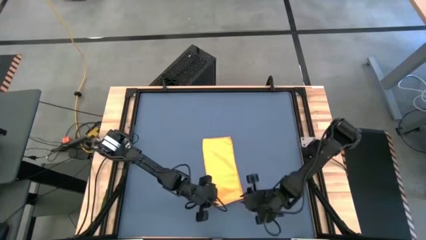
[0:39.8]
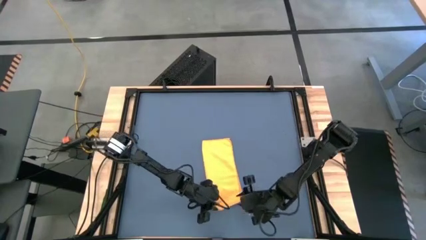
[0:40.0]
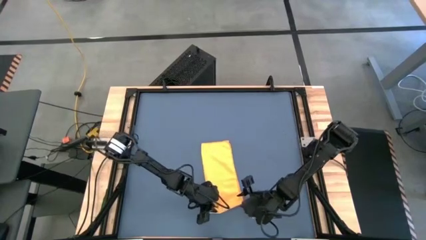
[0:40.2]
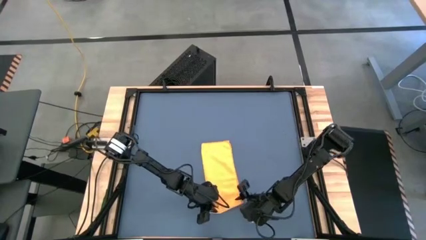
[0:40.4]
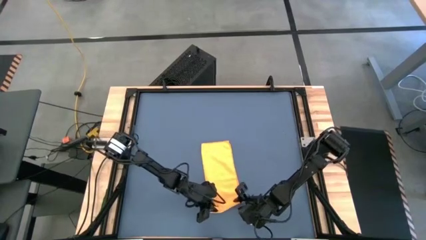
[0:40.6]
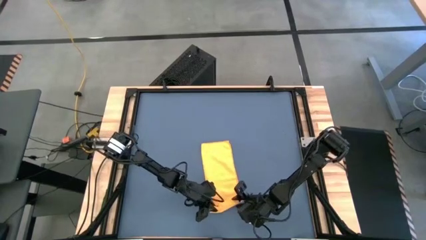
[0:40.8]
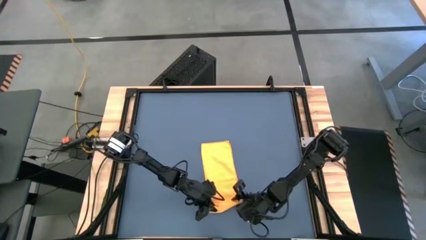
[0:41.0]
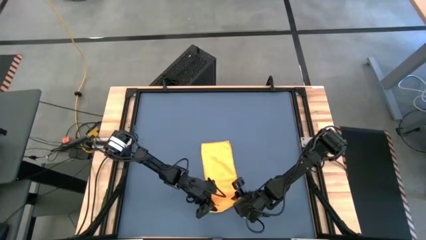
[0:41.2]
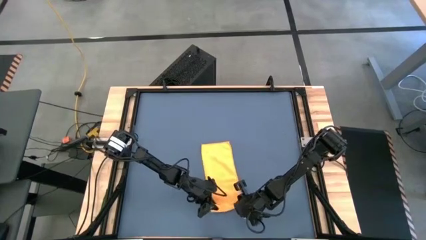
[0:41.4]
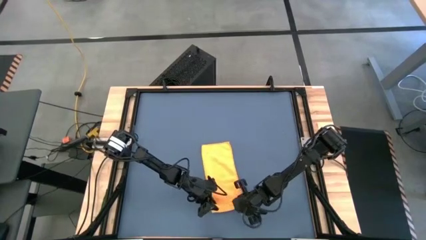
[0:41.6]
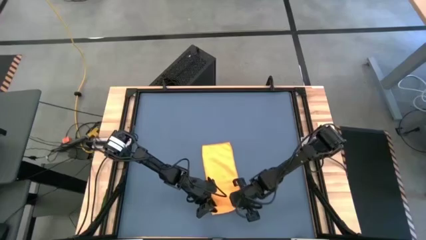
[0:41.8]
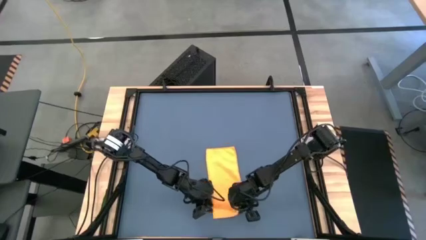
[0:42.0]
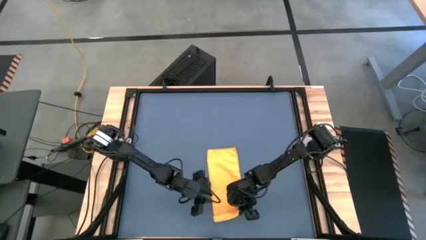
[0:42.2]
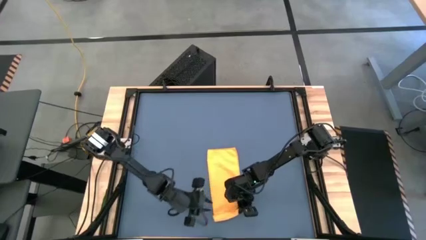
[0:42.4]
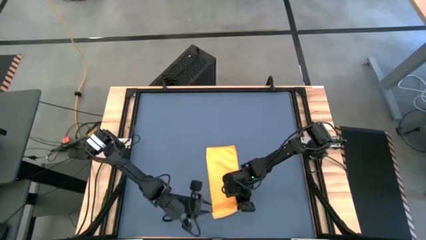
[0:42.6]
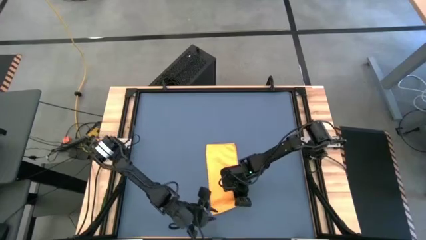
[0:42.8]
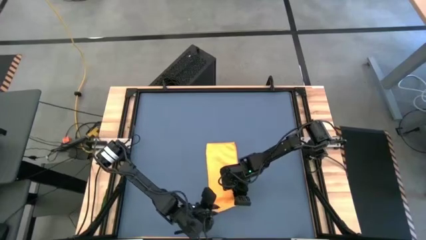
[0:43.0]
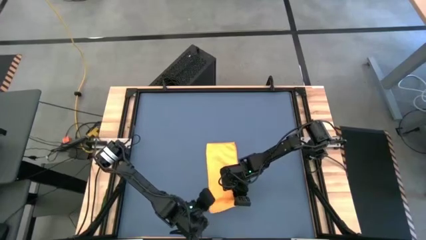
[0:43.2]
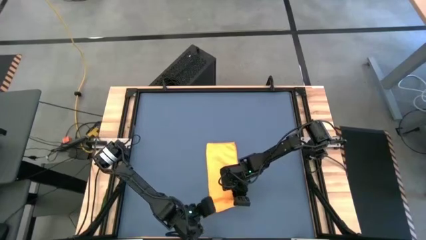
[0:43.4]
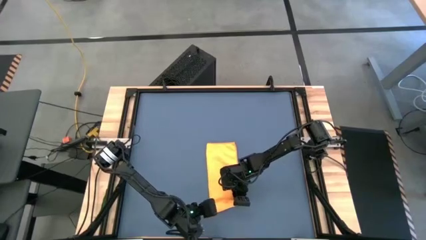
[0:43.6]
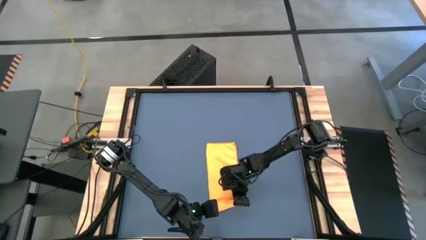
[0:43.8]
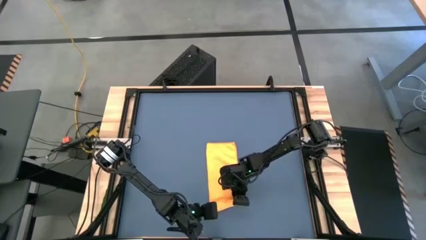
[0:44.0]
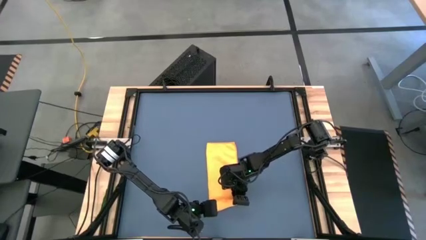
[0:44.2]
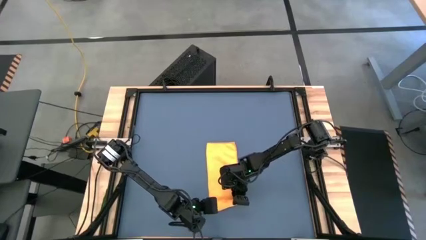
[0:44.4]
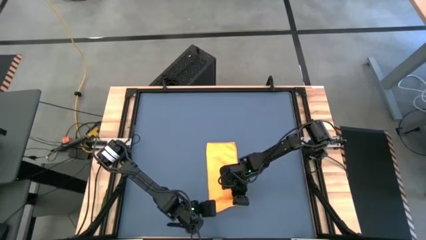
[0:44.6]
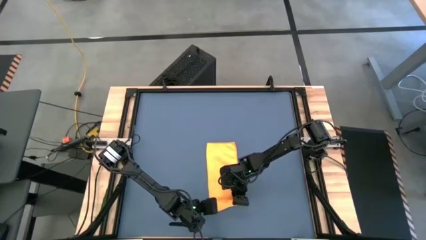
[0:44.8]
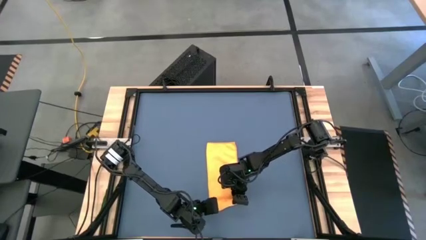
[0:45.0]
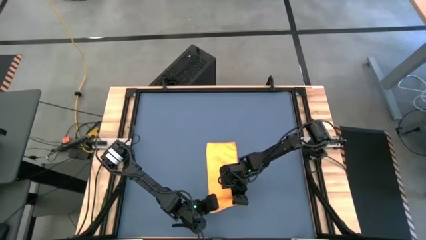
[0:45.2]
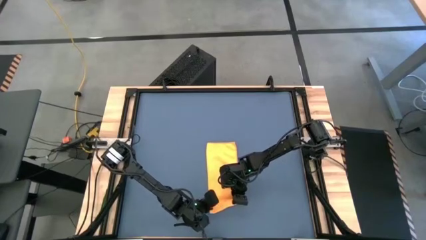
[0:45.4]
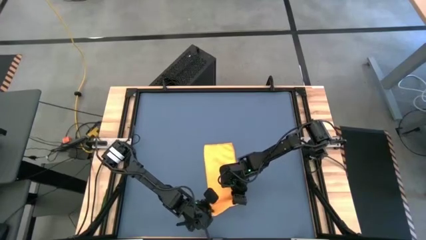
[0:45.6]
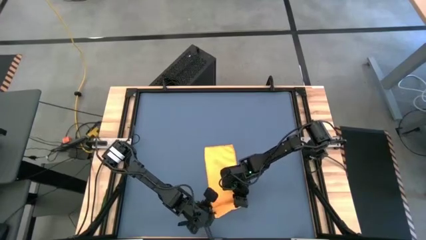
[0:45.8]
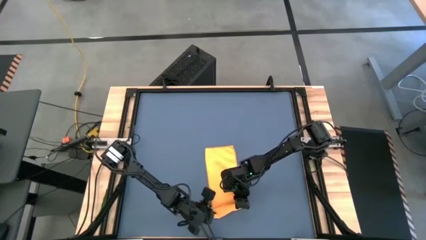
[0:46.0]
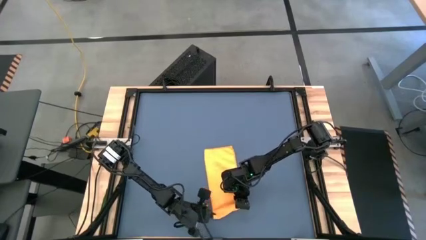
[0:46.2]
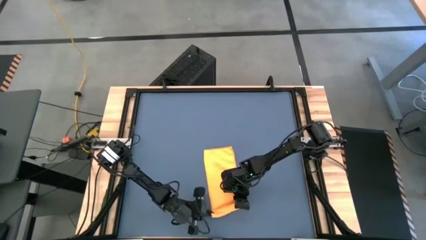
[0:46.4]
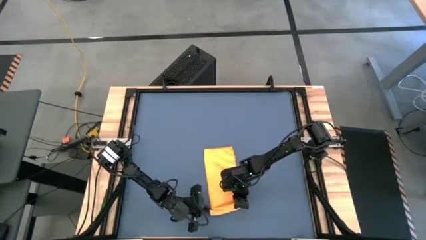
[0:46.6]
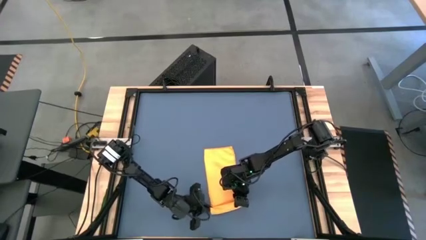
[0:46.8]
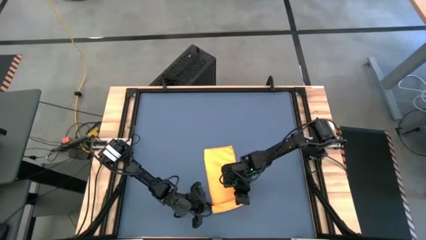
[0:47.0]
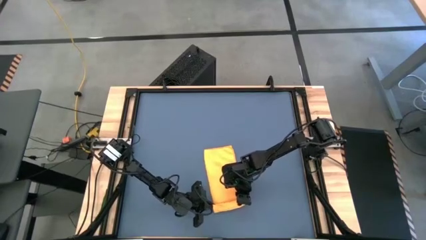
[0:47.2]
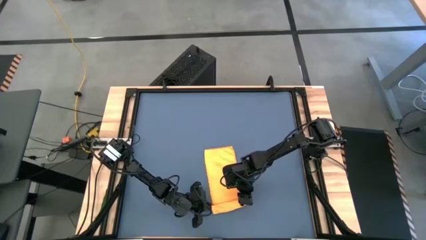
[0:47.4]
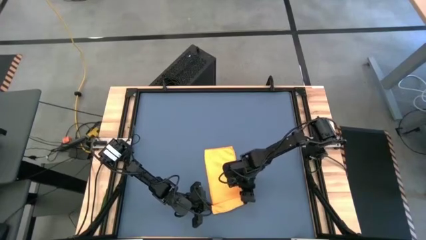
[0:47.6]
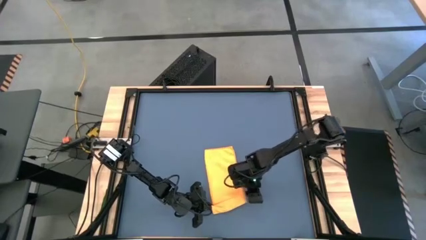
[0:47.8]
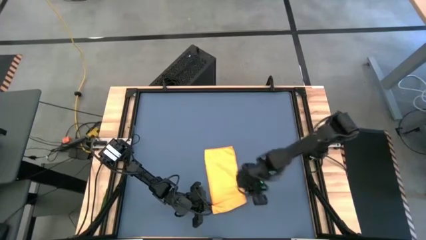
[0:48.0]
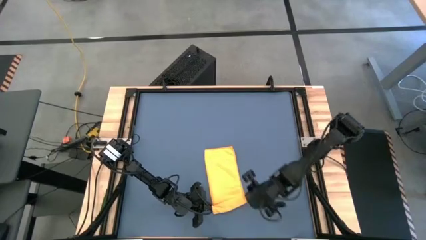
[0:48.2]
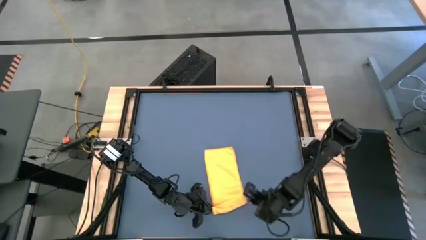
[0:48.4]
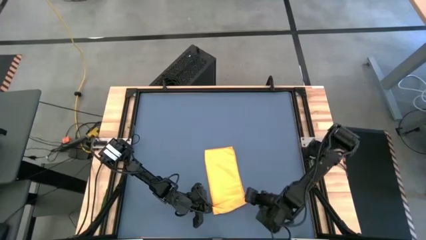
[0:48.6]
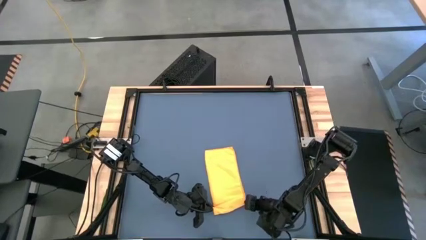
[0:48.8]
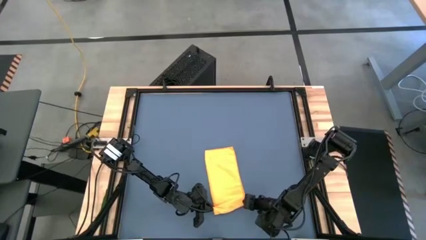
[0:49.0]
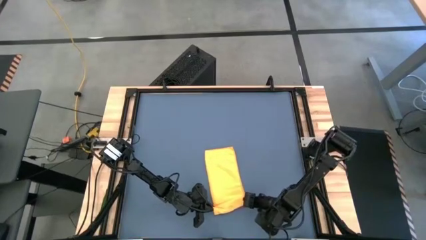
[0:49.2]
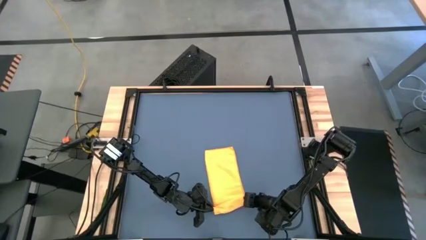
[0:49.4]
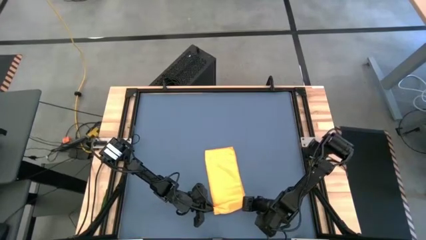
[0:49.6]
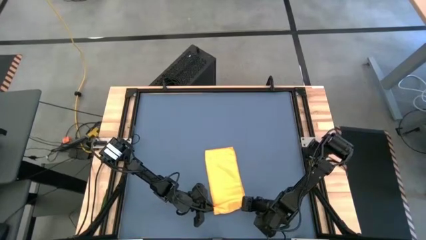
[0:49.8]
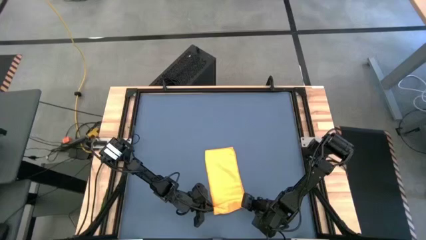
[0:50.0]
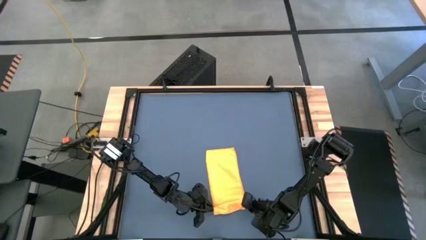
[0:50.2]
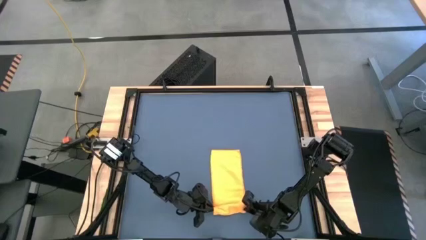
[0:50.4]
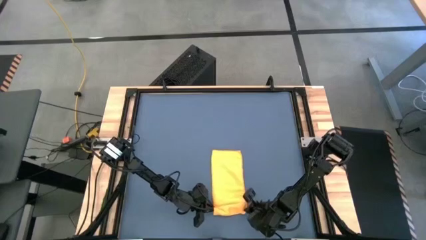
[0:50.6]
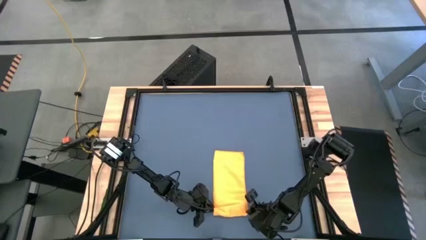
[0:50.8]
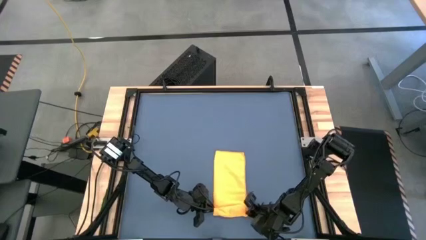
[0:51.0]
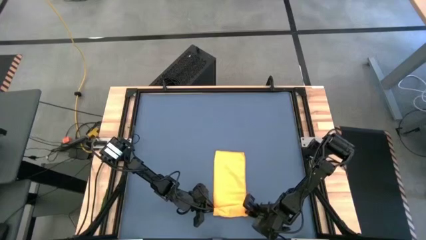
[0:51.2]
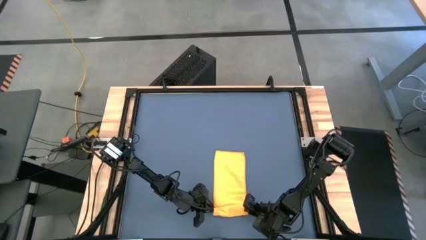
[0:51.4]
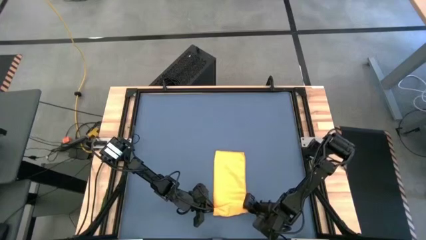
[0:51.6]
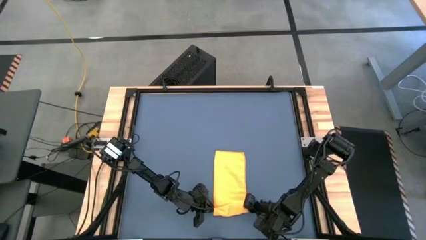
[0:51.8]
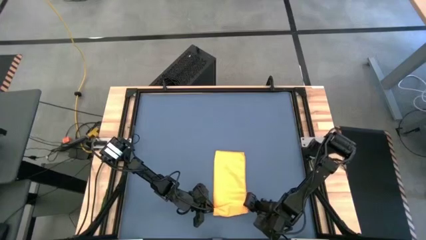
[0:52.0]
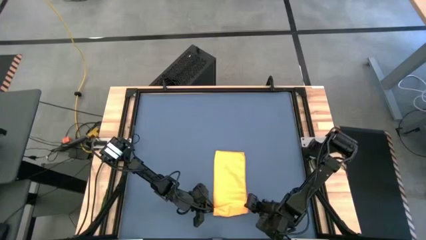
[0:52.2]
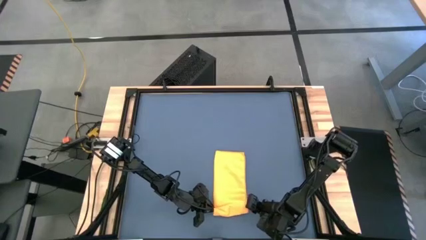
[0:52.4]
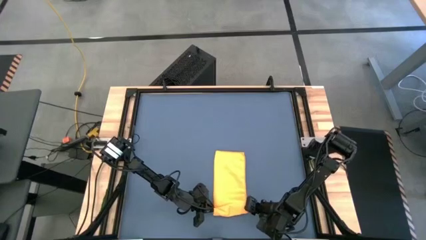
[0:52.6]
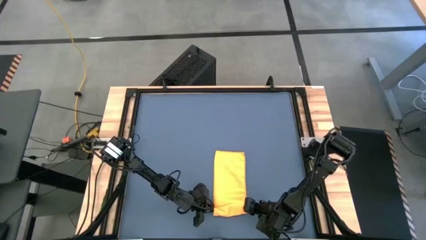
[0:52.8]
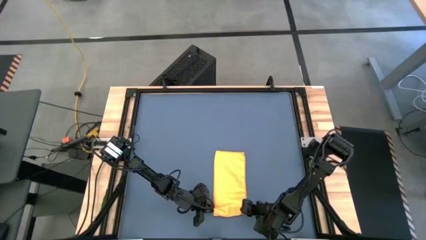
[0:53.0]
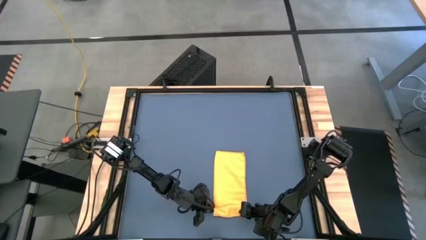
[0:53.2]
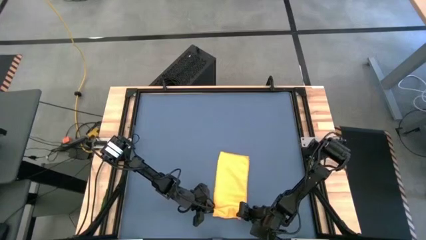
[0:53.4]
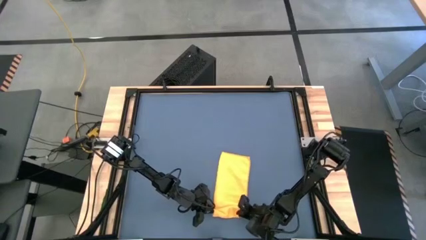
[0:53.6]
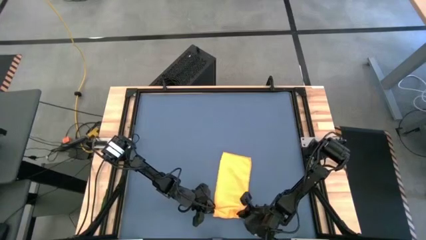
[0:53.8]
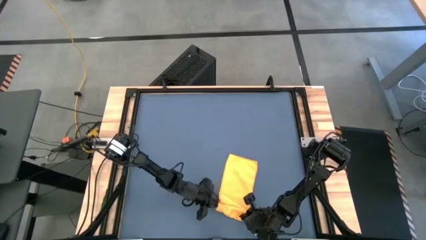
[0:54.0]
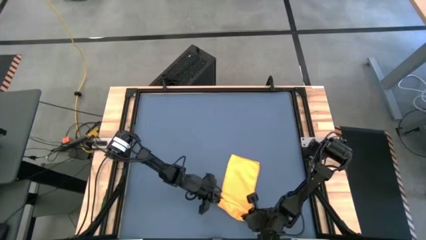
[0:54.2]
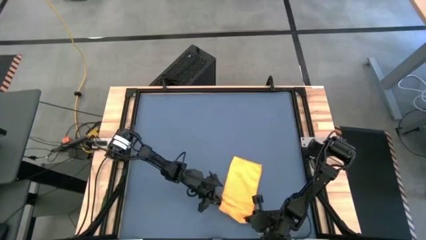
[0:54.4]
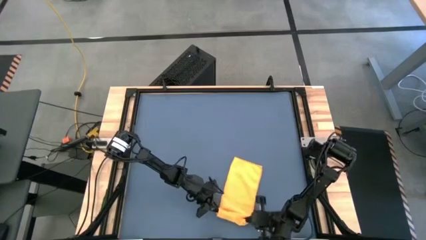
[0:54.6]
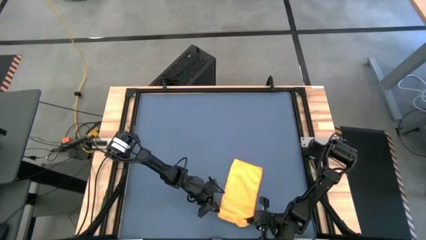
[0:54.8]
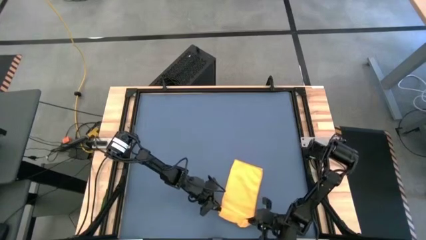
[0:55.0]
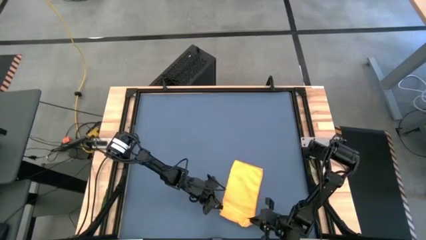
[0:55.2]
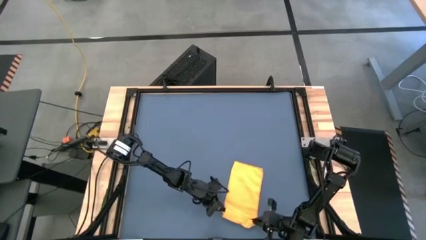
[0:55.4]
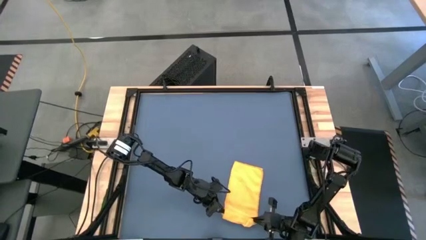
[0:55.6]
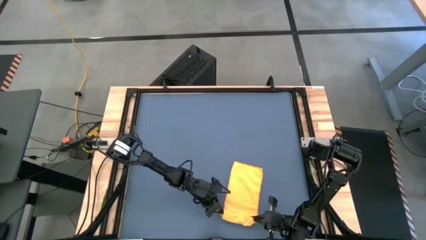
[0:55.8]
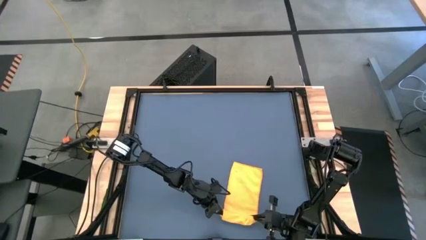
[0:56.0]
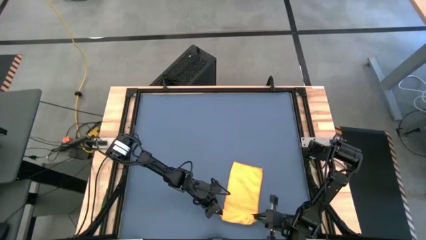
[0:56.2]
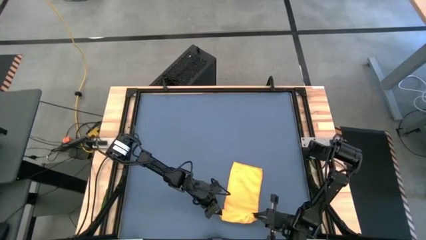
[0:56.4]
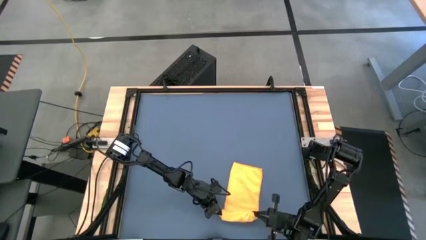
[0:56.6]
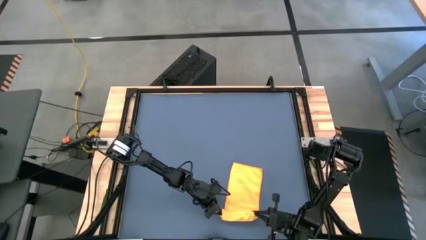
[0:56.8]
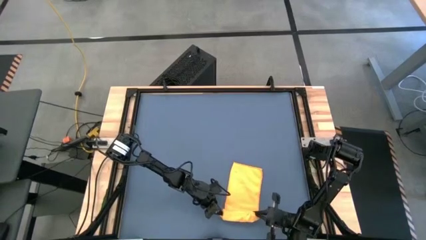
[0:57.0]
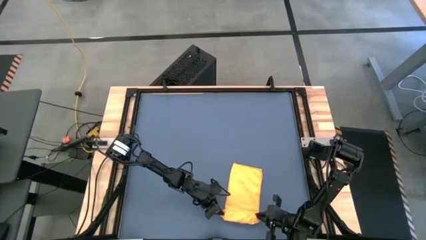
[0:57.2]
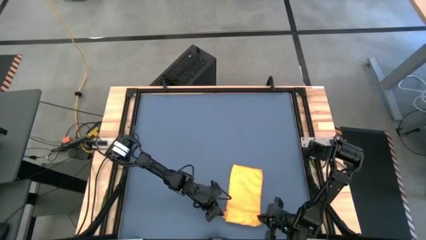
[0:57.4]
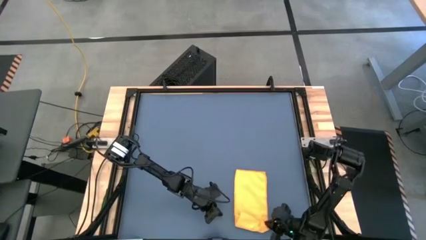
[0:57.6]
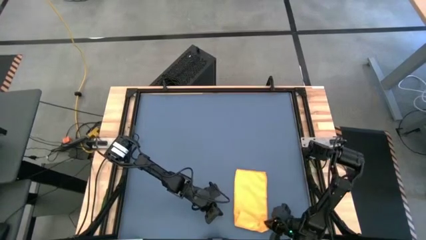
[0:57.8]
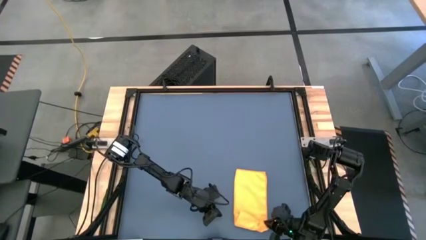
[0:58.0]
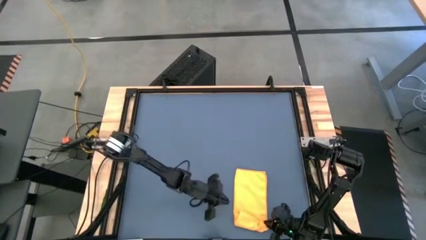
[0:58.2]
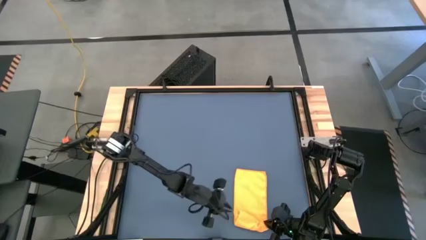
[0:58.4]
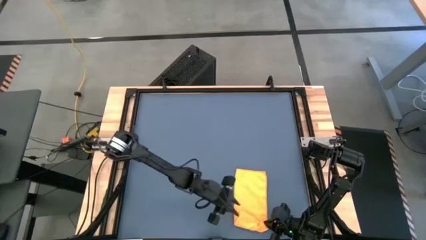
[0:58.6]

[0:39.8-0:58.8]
Task: Roll towel
Roll the yellow microfiber towel
